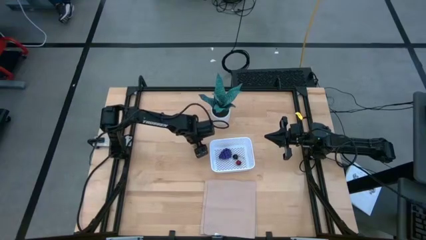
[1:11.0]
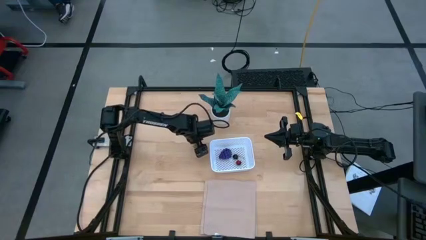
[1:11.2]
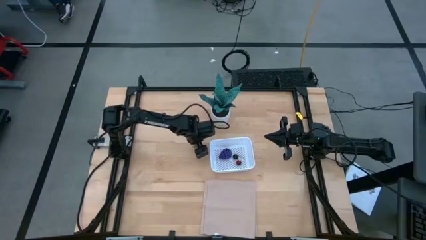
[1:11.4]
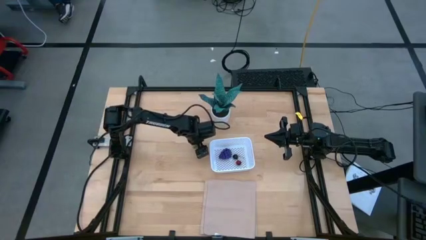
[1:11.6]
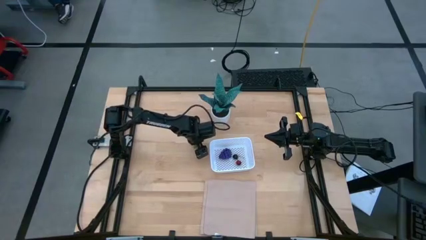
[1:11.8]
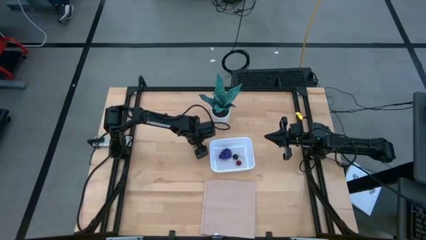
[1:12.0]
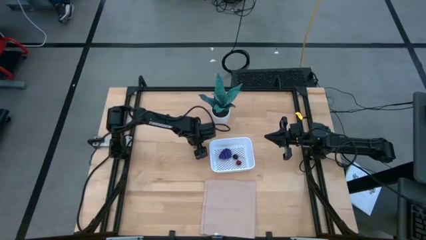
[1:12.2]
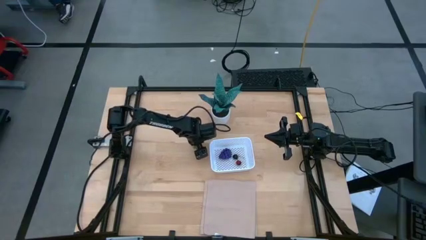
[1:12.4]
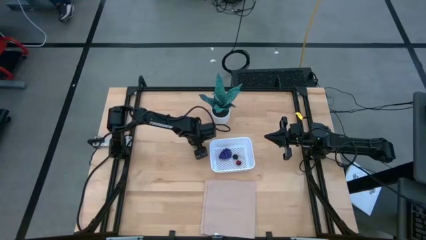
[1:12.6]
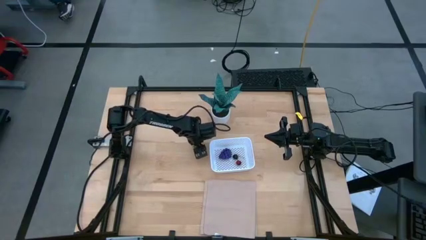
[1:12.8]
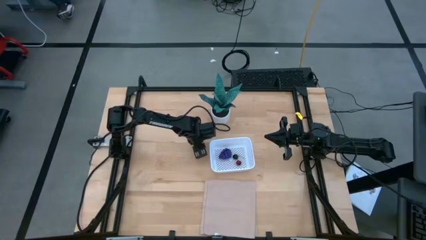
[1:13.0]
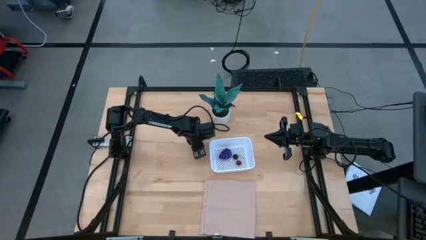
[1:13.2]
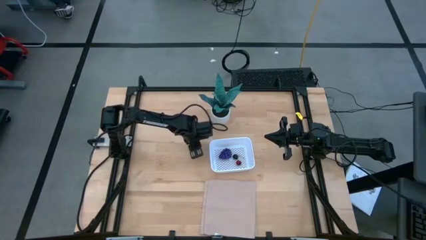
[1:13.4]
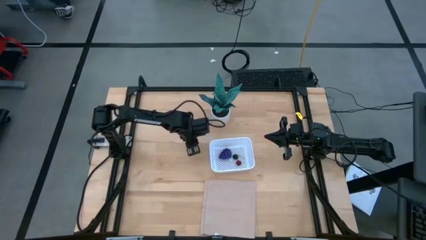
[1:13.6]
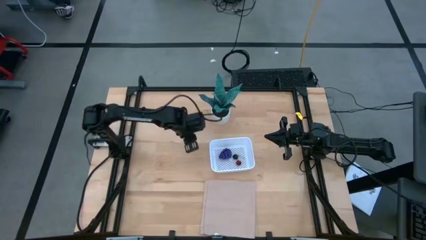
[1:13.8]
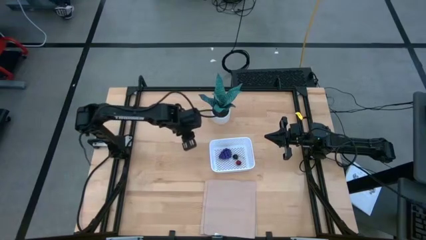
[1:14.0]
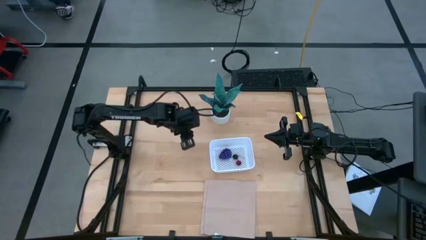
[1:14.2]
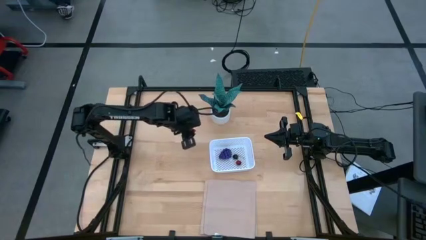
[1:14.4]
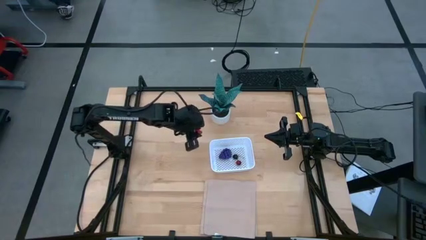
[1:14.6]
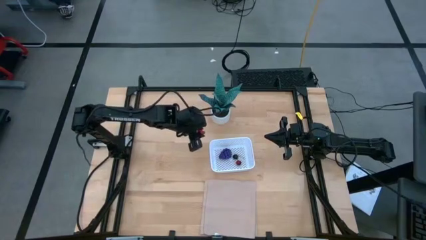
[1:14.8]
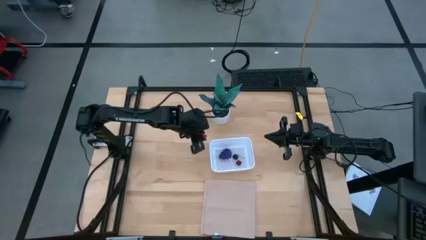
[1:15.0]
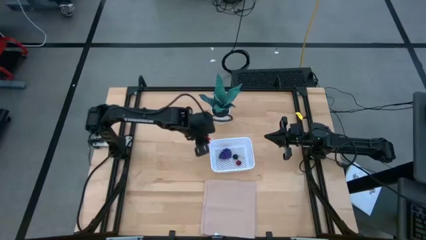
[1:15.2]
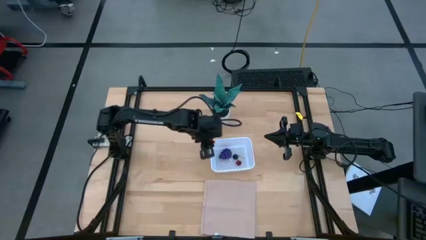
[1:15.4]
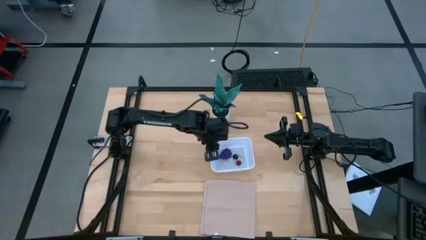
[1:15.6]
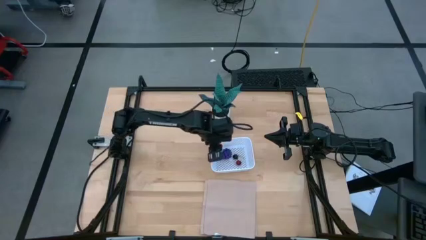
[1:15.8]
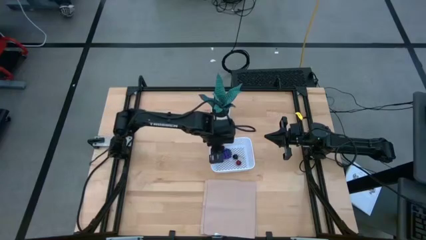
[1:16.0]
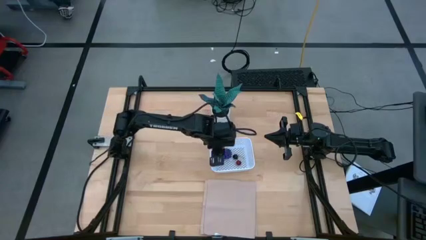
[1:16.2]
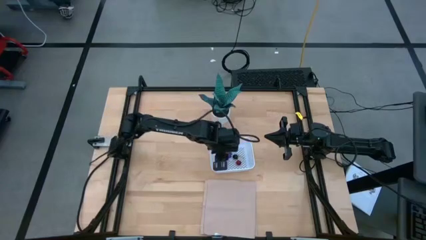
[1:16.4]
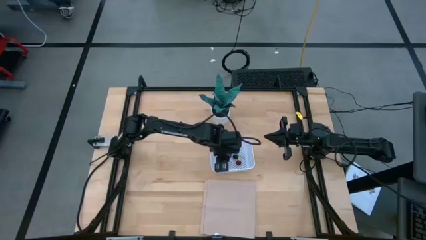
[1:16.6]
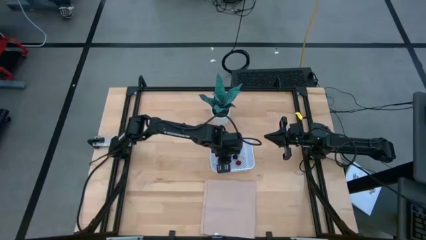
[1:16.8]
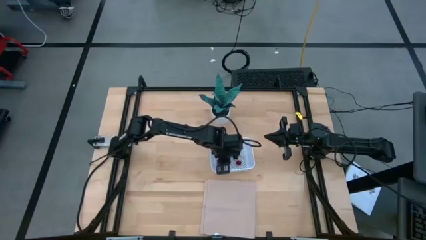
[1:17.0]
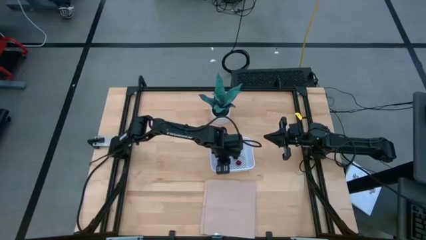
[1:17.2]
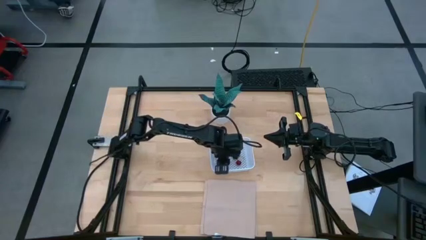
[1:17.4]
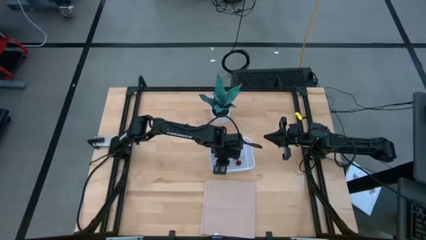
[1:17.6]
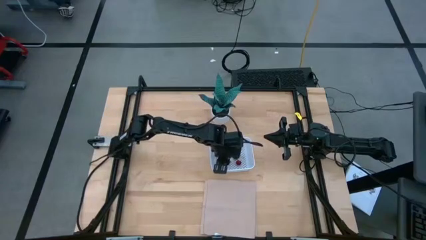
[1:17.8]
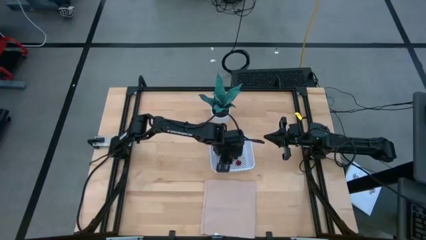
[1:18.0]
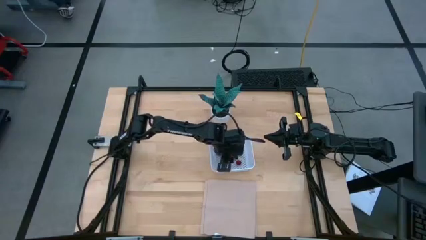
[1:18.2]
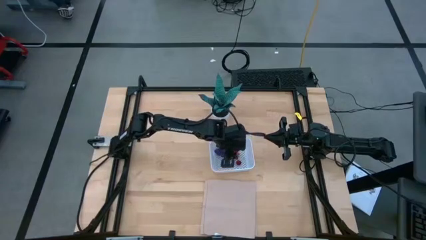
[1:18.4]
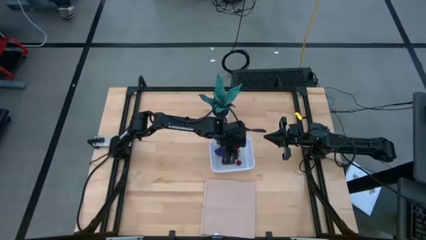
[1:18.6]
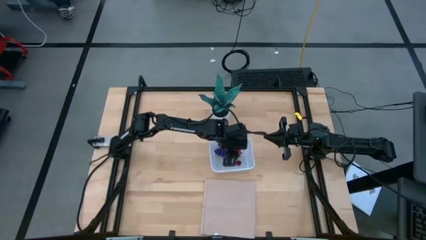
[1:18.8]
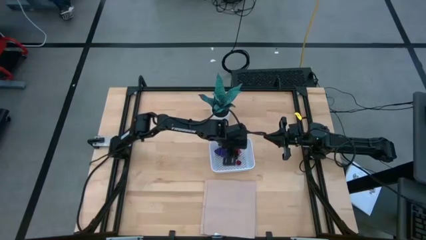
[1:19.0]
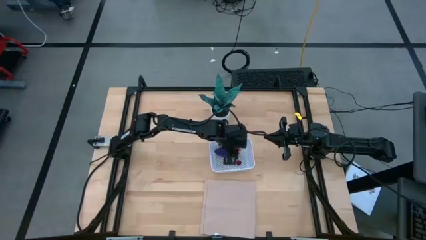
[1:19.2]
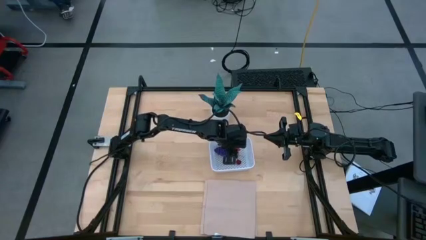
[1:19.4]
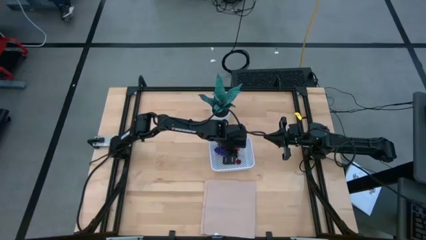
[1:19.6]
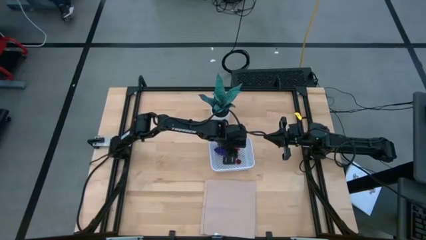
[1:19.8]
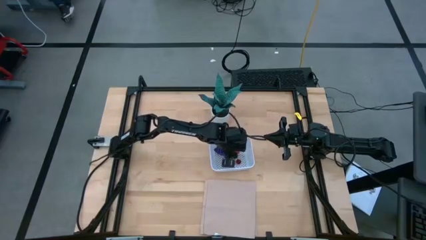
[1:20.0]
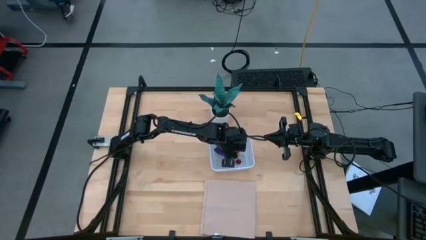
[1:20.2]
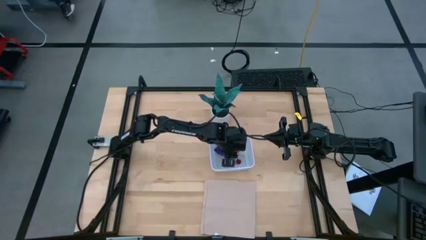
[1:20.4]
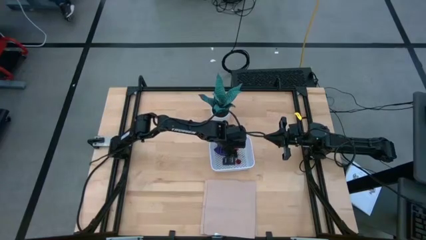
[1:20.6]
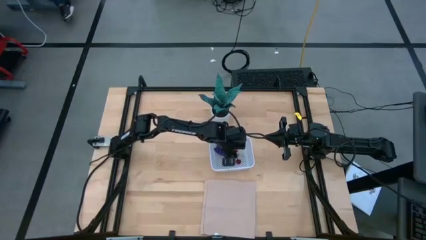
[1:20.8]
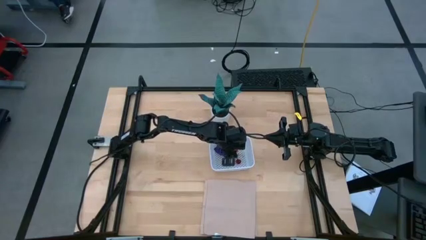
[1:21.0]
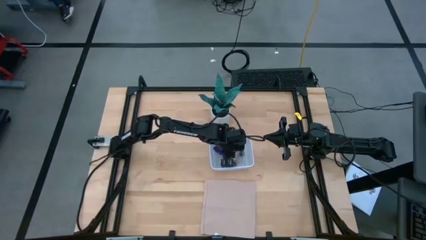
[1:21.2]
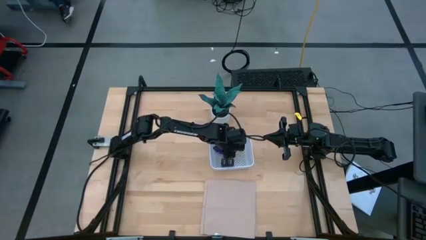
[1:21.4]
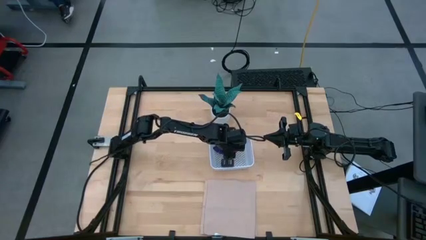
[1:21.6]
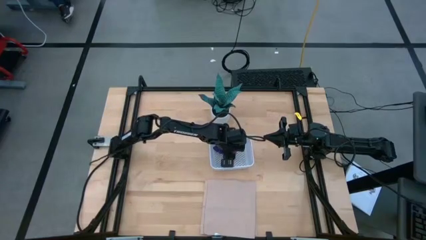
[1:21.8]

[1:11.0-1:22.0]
Task: Pick and placing Produce into tupperware
Put the strawberry into the basket

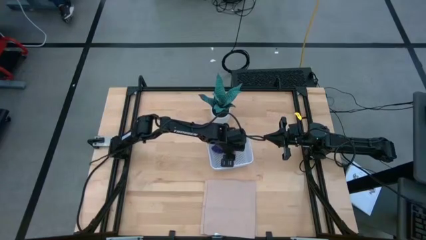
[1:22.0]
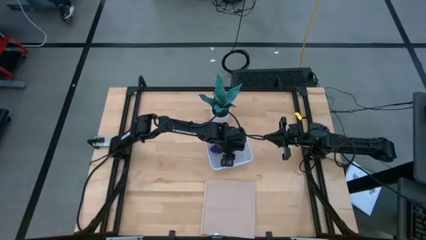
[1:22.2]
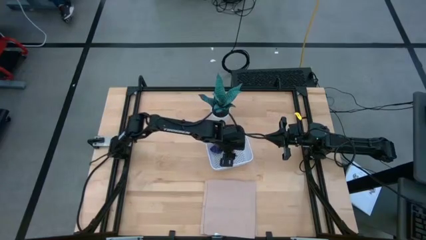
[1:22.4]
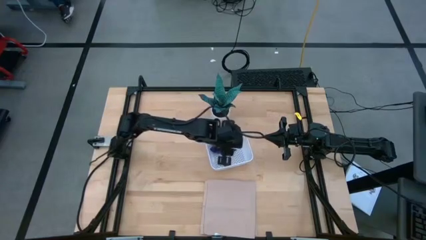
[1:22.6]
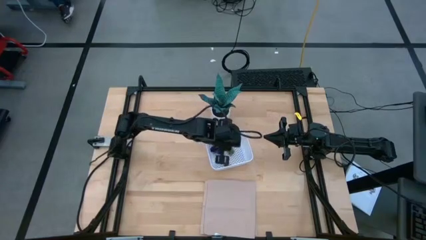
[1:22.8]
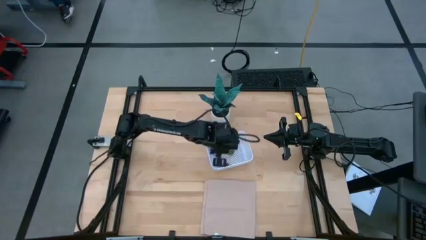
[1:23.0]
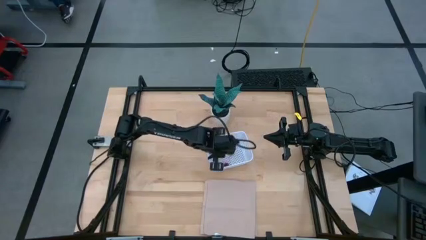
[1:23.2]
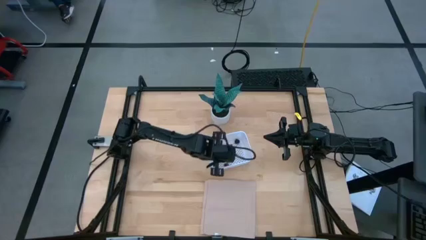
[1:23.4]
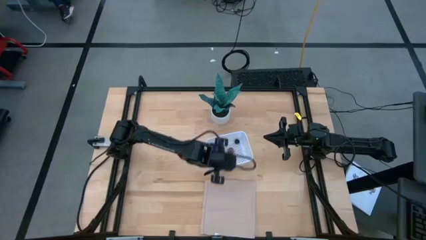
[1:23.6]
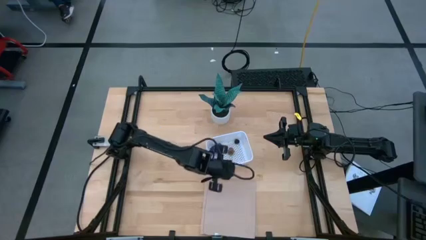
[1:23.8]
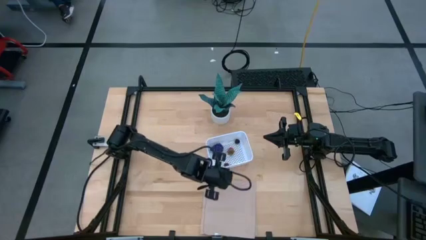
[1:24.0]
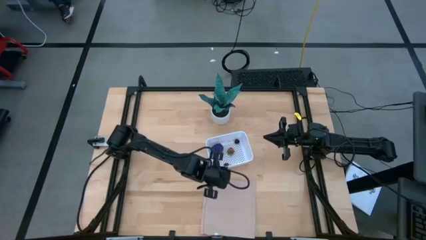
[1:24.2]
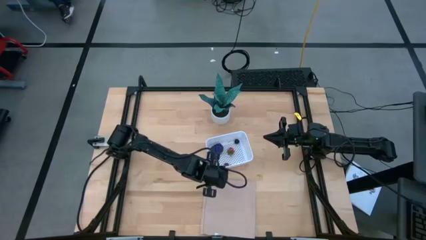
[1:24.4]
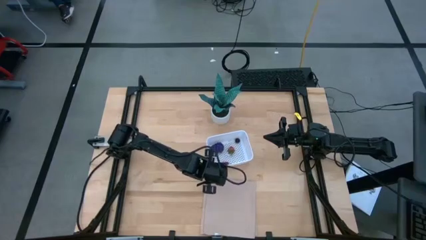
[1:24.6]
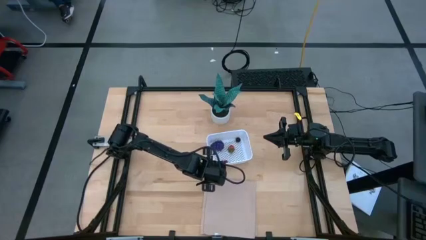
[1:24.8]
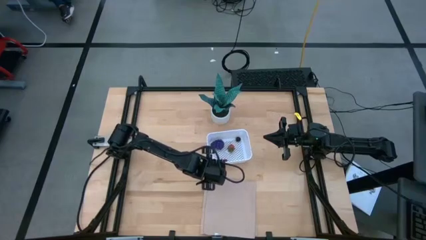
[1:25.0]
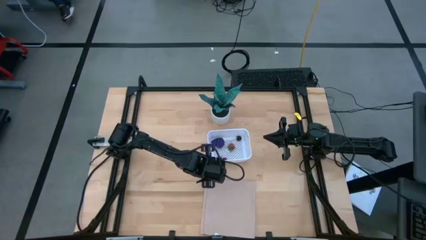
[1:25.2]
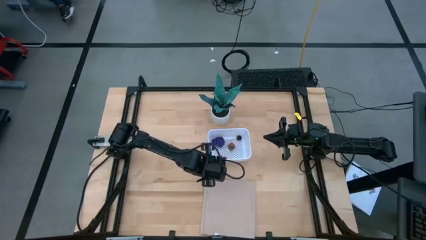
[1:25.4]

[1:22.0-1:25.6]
Adjust the basket on the table
